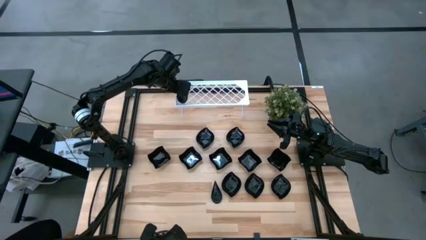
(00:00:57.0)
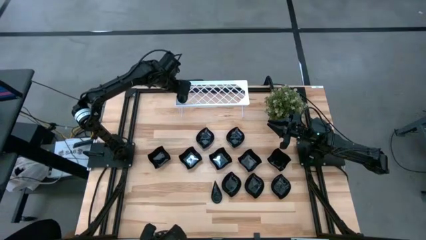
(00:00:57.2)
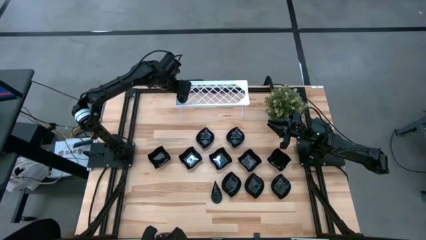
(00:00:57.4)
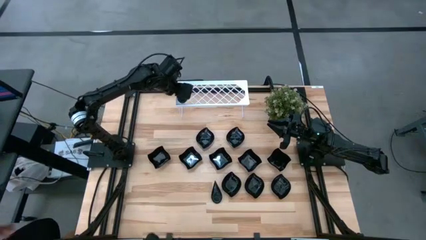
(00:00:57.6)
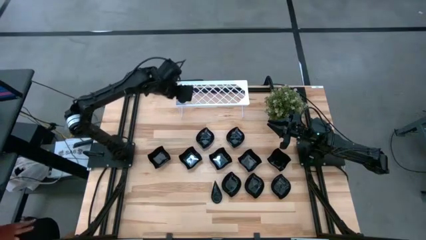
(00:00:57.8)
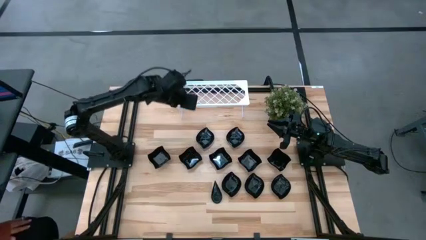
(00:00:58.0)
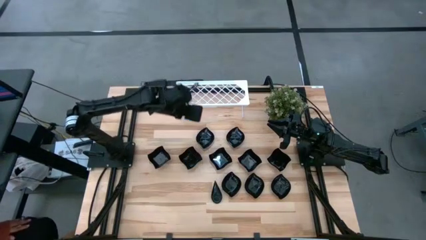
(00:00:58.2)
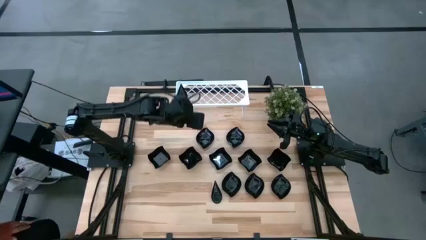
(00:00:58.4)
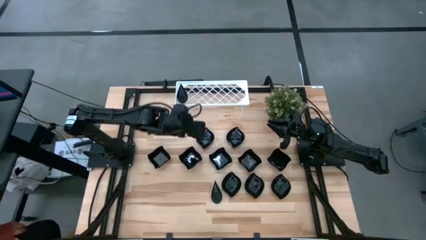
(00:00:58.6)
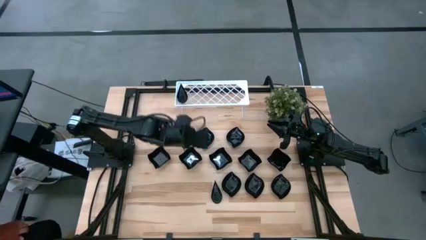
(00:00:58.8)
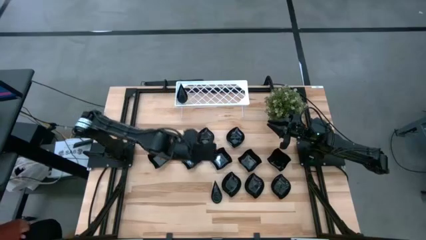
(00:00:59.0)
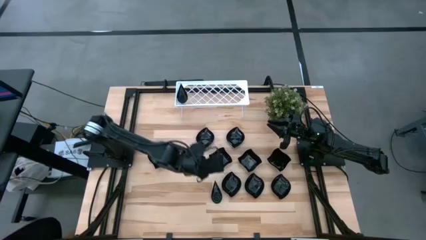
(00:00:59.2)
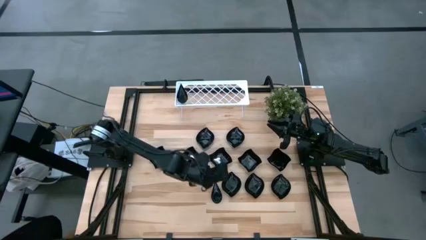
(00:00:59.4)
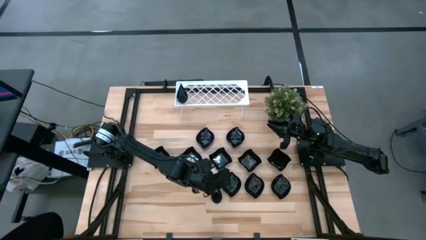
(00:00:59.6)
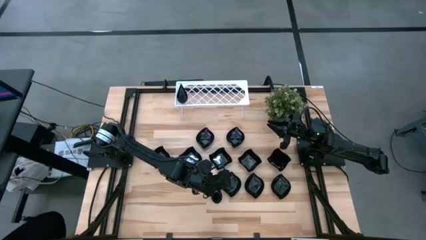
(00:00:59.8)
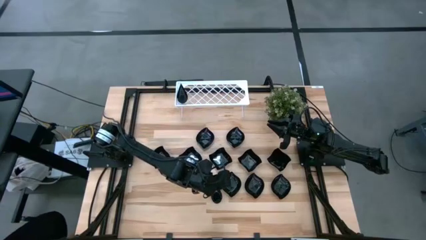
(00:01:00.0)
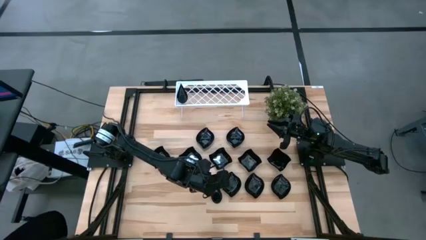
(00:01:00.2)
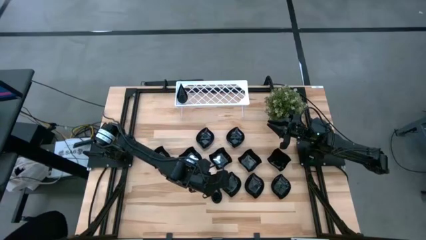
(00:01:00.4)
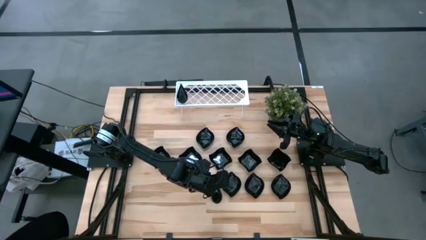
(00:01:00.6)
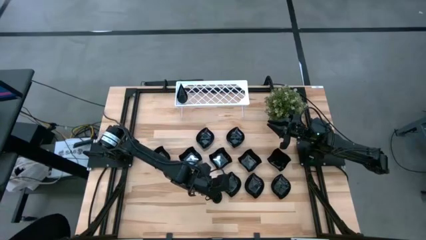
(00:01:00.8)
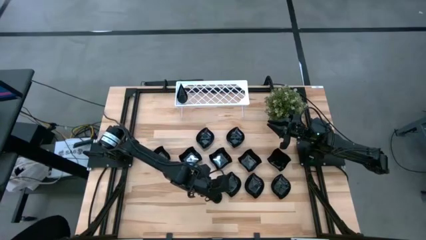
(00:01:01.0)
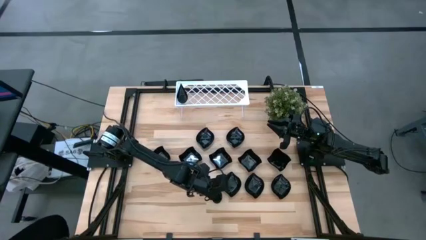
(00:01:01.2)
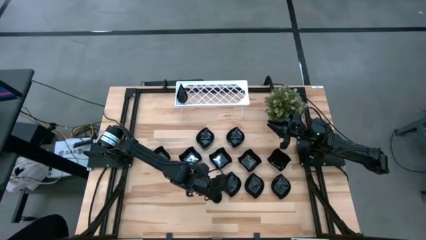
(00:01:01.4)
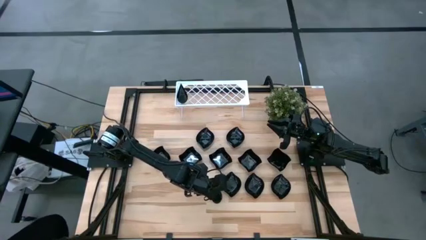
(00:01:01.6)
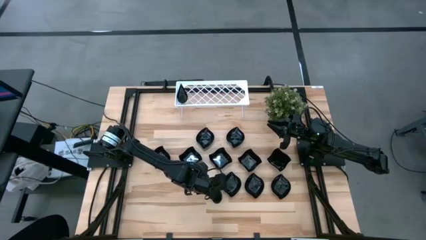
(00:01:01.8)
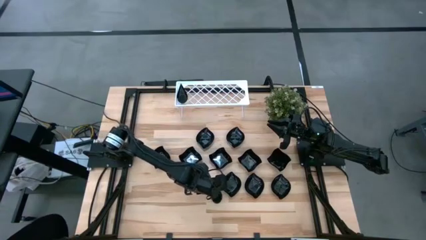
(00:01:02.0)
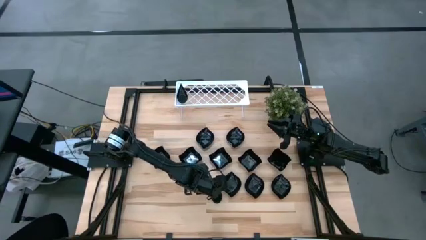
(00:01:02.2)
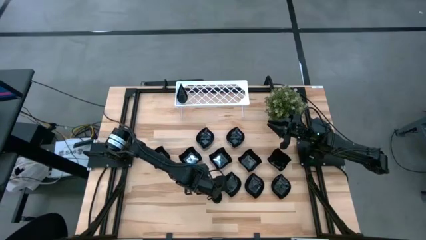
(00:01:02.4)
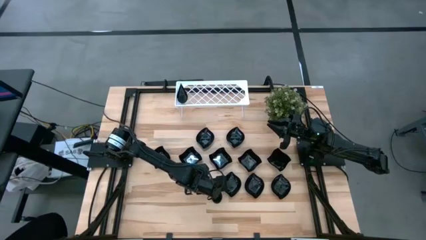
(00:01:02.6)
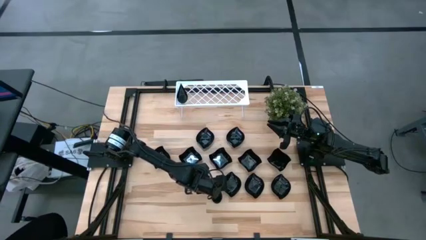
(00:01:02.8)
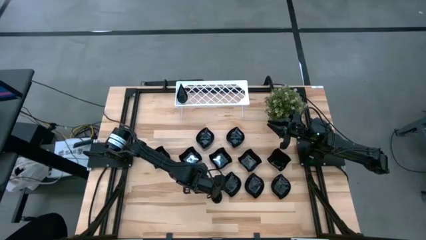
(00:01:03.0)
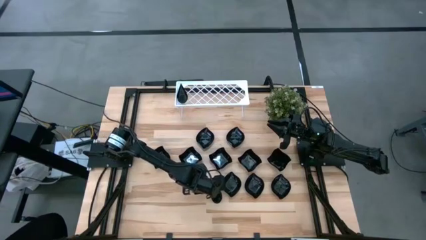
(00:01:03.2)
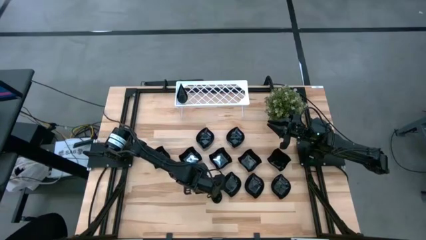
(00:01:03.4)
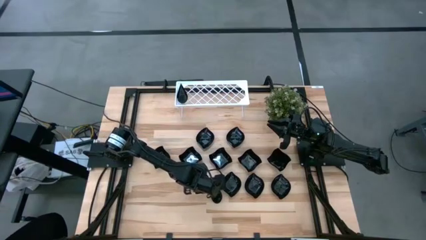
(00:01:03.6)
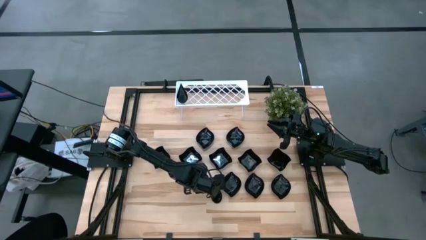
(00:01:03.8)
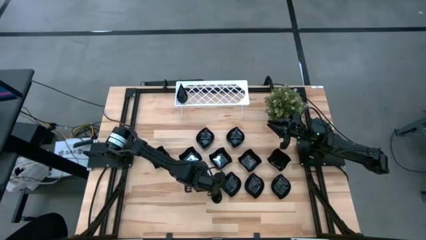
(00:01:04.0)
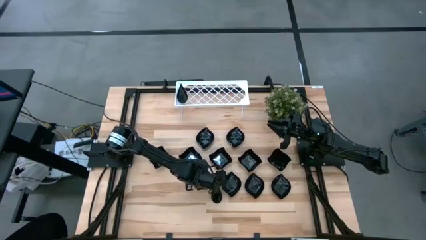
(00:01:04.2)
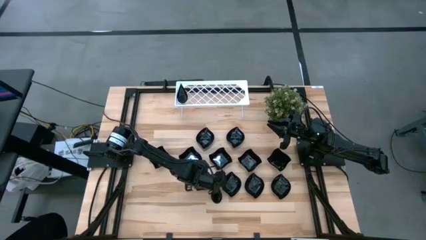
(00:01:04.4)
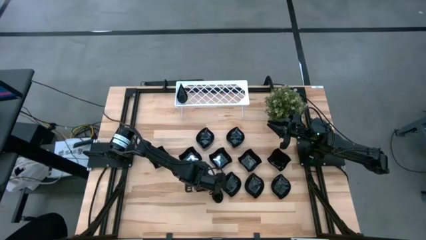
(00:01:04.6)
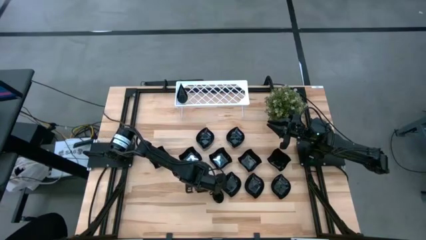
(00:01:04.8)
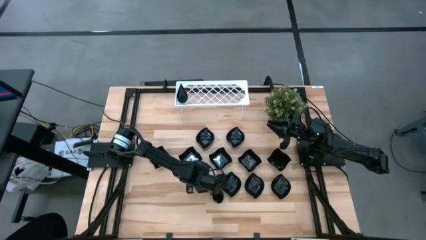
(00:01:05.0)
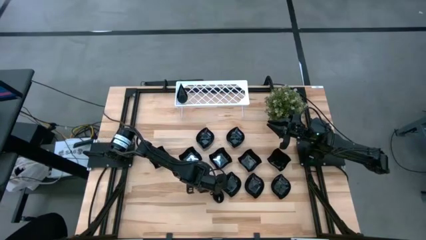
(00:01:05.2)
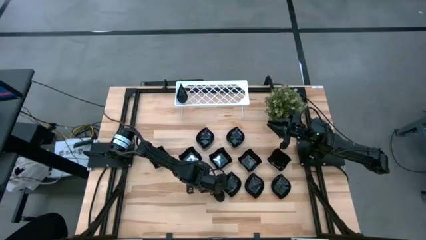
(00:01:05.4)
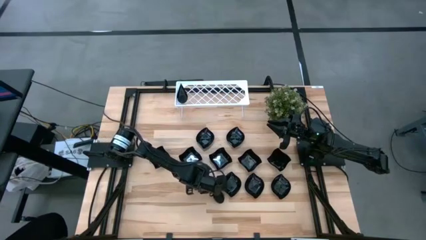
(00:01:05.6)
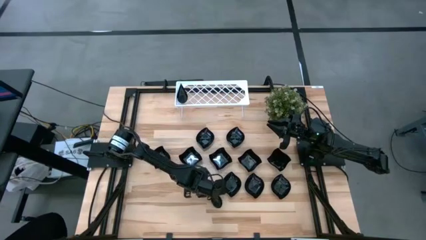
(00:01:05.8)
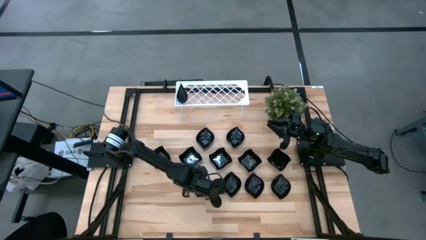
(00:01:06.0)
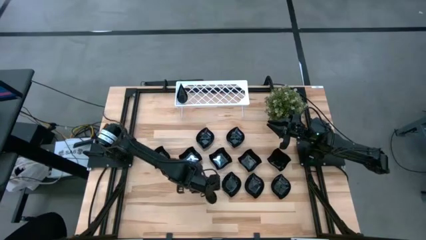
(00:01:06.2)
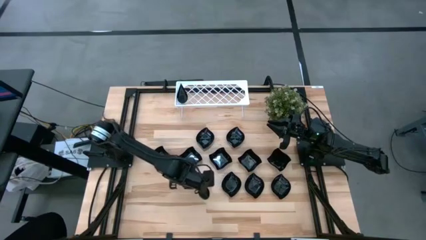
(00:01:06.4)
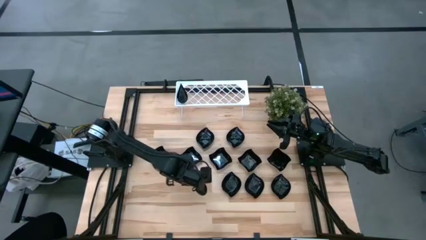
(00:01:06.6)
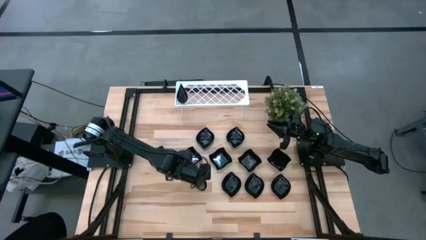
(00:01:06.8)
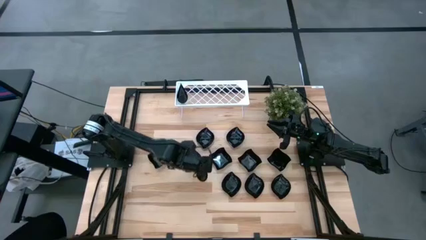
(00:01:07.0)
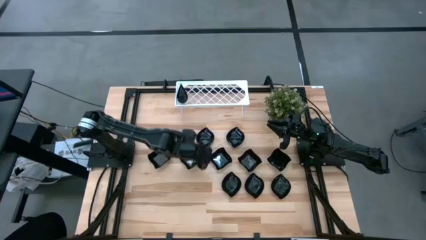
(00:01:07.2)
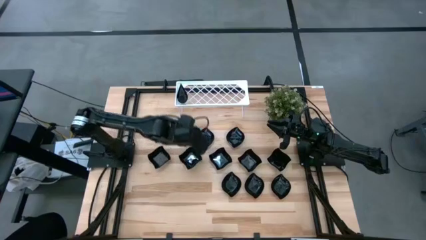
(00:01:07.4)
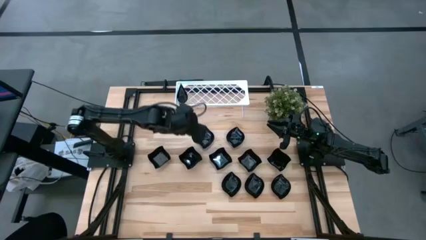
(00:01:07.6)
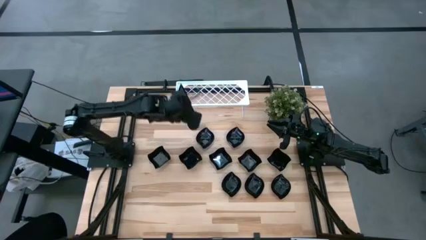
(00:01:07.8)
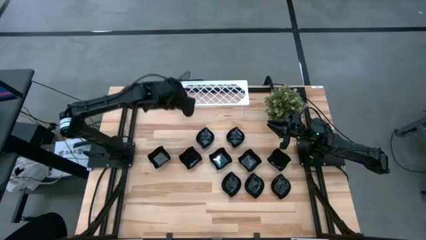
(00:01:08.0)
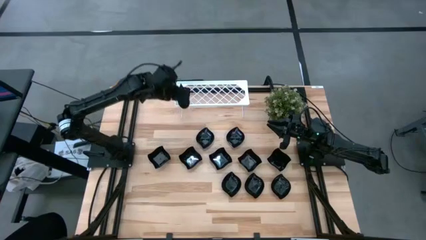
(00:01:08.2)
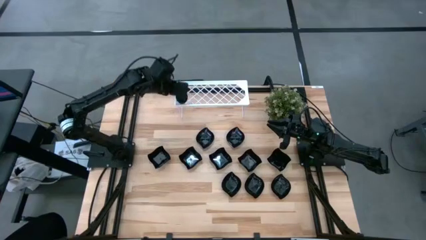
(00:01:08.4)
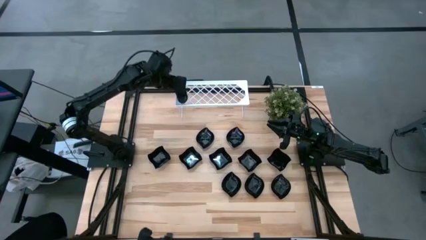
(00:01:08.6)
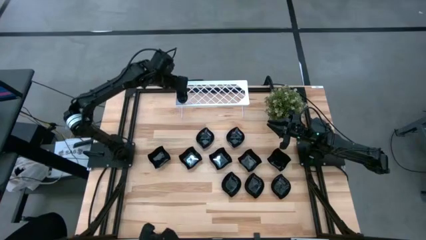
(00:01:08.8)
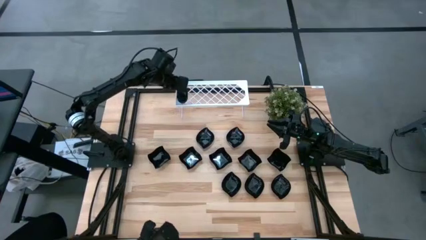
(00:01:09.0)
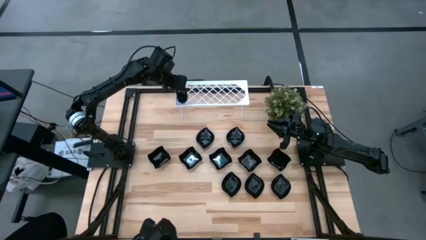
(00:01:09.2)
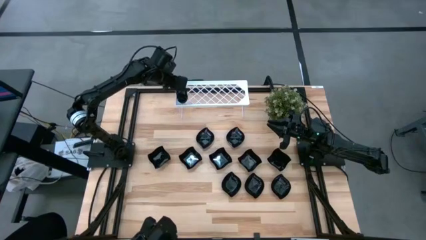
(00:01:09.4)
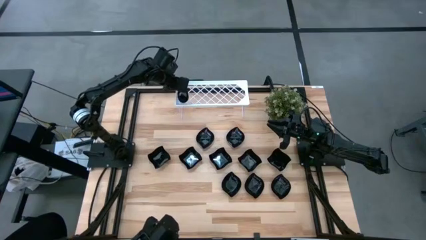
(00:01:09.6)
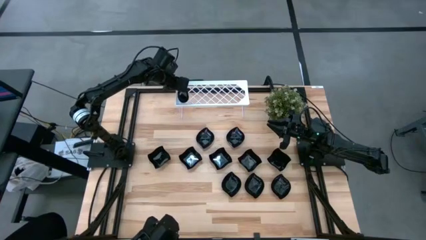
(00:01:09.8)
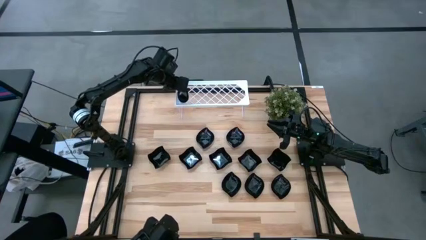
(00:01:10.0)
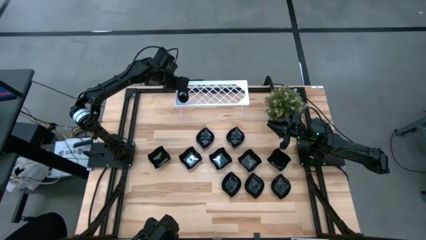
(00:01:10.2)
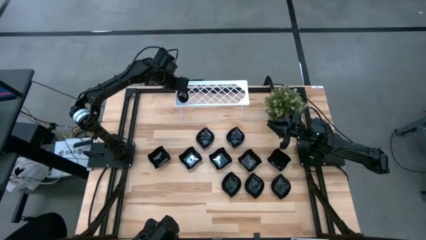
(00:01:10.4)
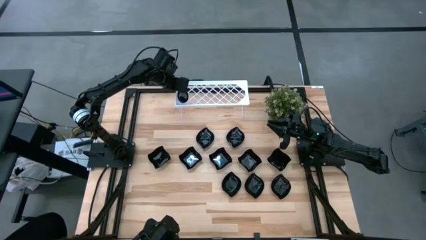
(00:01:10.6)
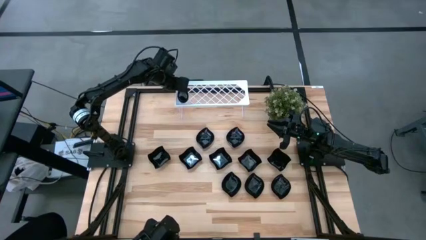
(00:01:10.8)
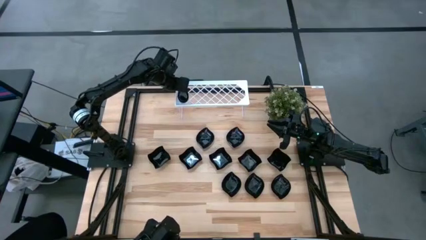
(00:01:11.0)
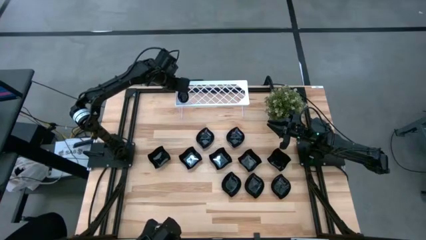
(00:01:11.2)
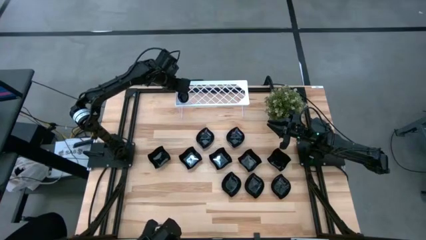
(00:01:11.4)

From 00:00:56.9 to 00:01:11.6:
Task: Pick & Place Mini shaped plates
Stack the drop-shaped plate on top of the drop-shaped plate on the shelf

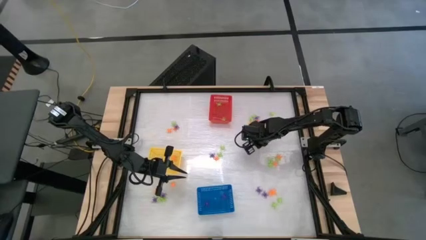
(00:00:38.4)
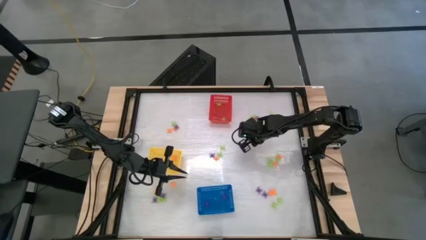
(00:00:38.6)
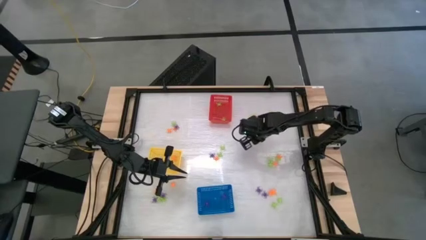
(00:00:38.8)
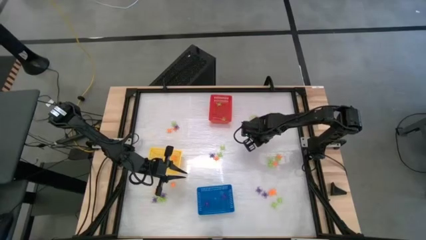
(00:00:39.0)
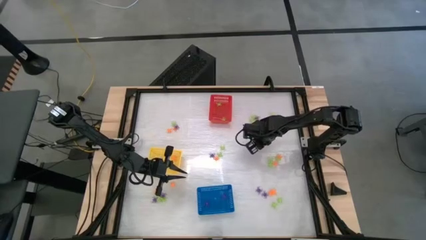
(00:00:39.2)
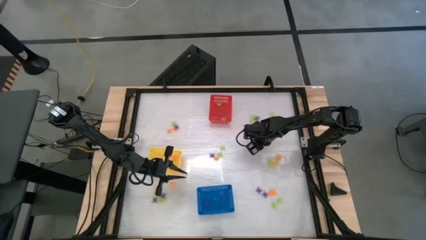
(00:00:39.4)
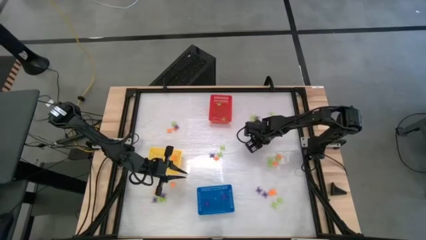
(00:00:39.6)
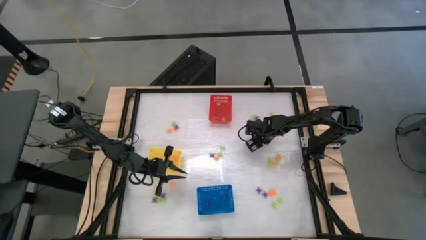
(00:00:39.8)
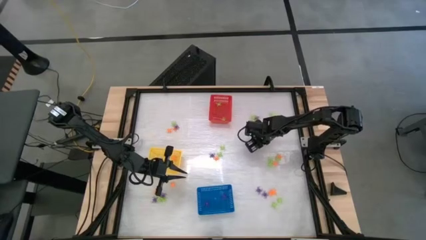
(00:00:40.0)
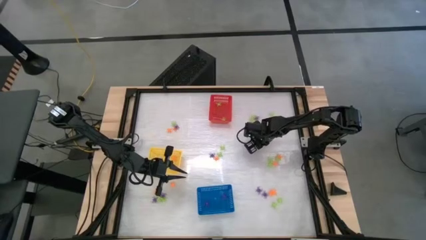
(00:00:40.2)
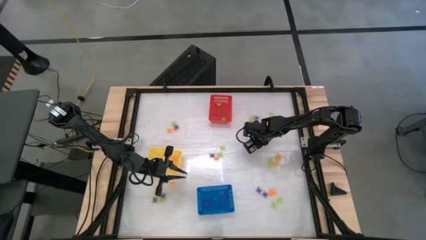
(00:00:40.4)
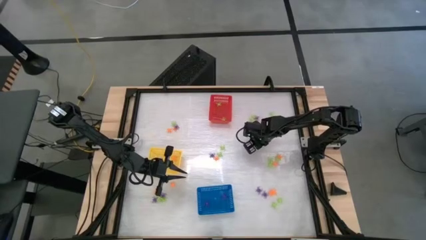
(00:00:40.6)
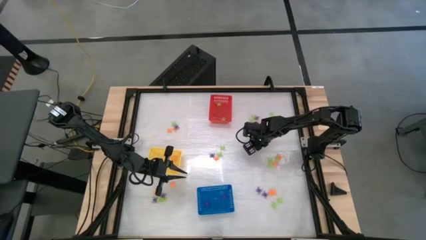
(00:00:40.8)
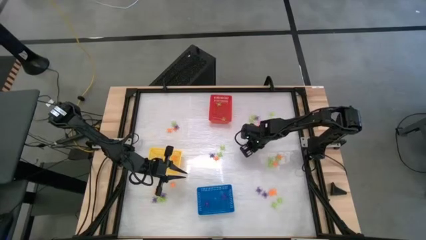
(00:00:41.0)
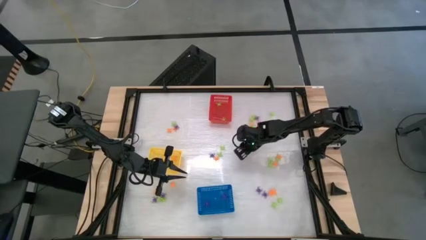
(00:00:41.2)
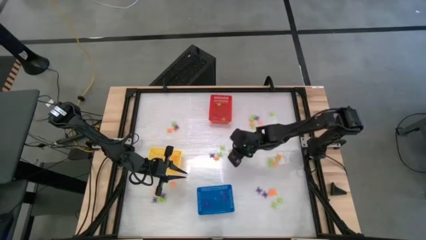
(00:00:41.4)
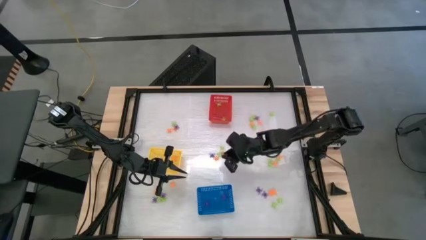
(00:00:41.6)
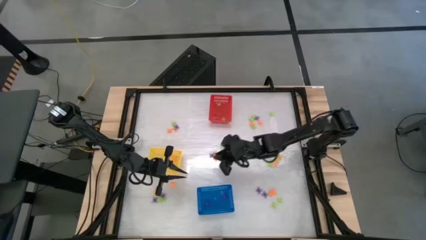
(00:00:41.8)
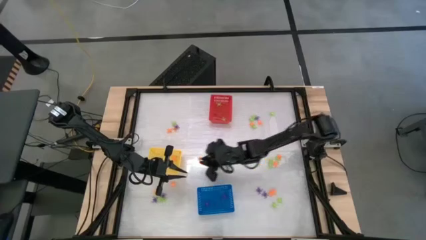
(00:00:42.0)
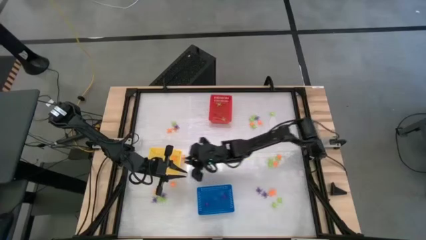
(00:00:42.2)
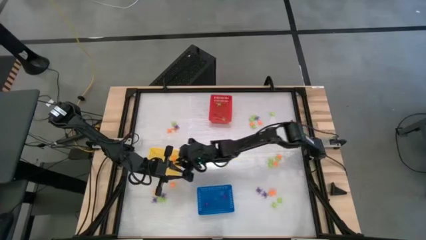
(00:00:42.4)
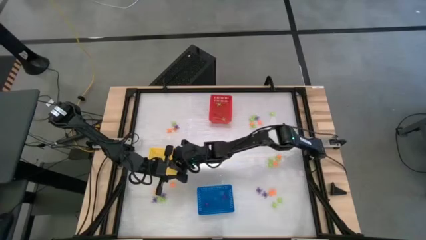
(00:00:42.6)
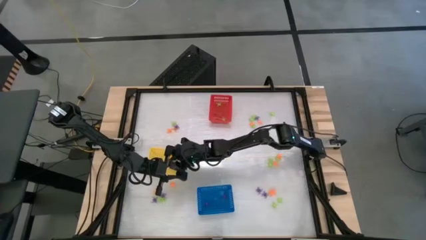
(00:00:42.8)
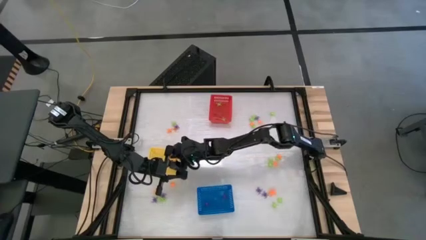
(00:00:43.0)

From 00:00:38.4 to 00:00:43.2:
Task: Sort Halloween decoration
Put the orange spider toy into the yellow basket
